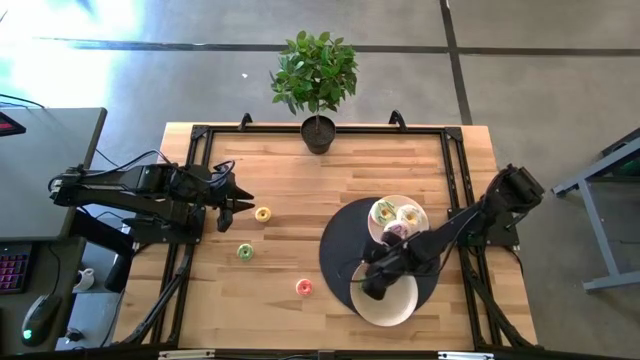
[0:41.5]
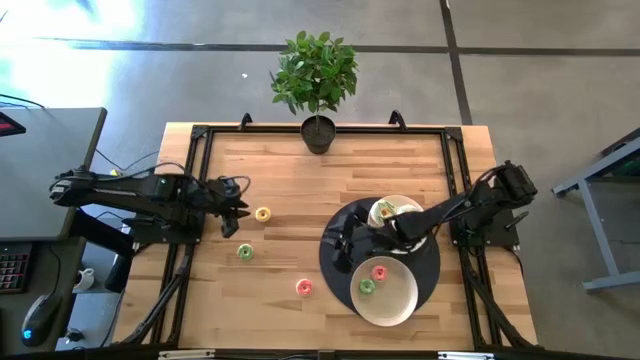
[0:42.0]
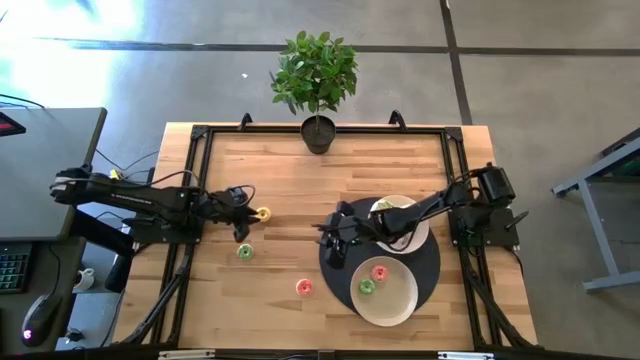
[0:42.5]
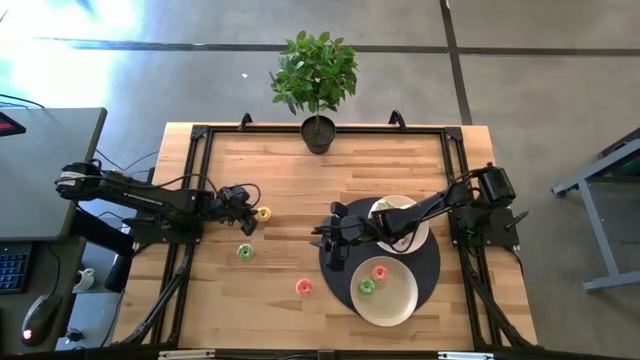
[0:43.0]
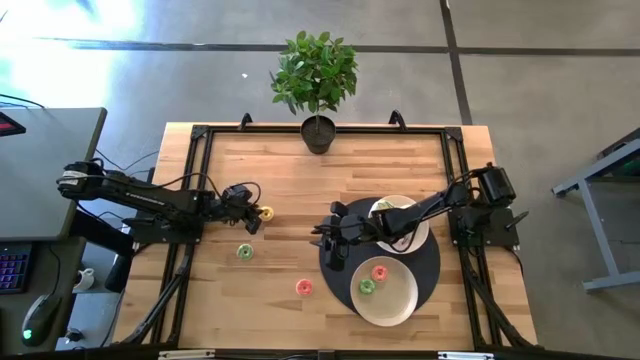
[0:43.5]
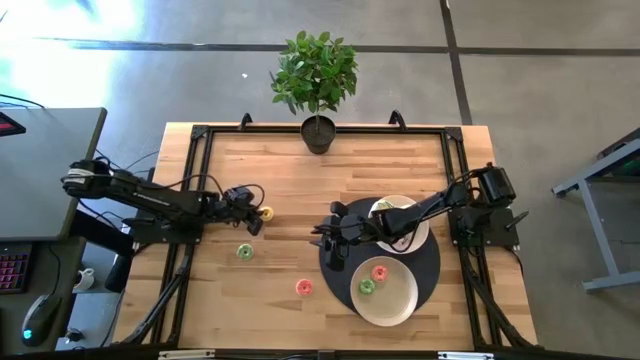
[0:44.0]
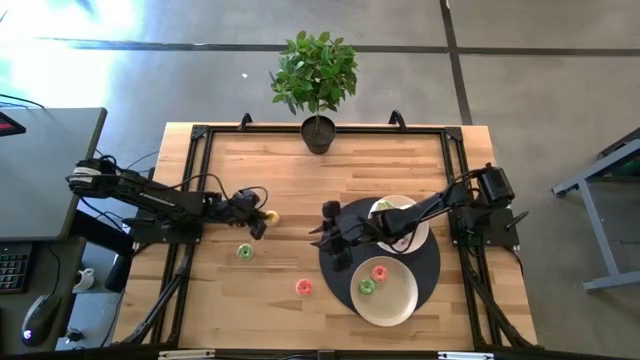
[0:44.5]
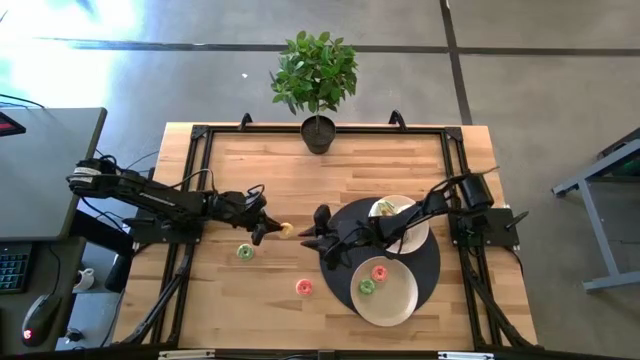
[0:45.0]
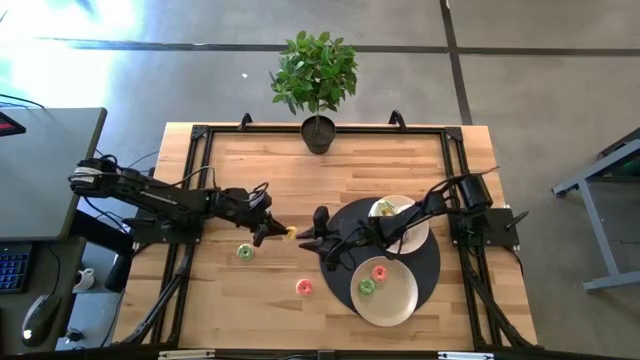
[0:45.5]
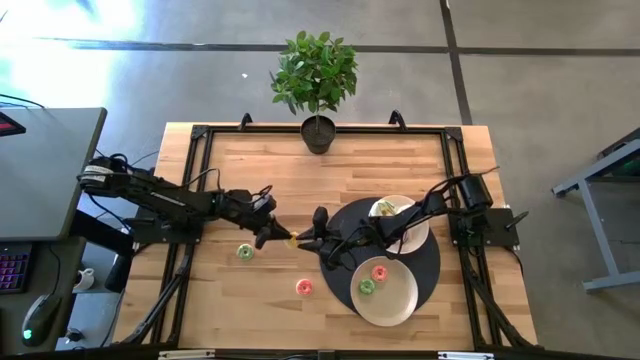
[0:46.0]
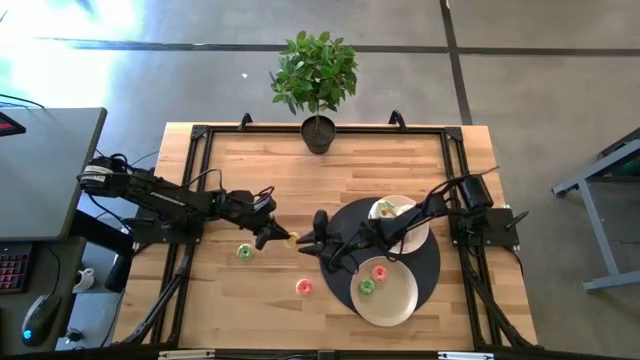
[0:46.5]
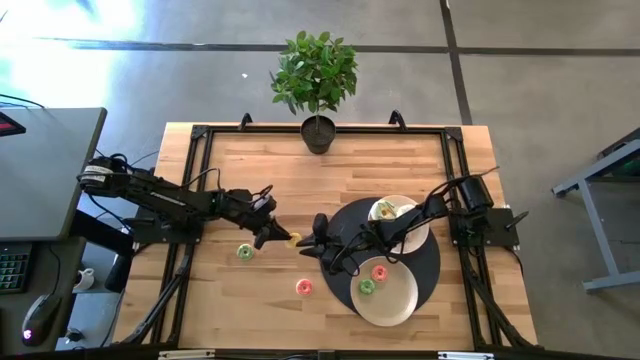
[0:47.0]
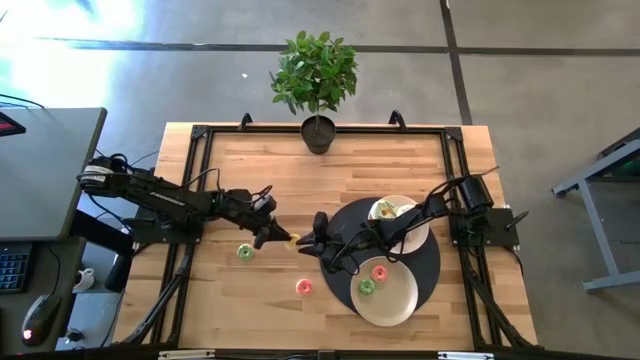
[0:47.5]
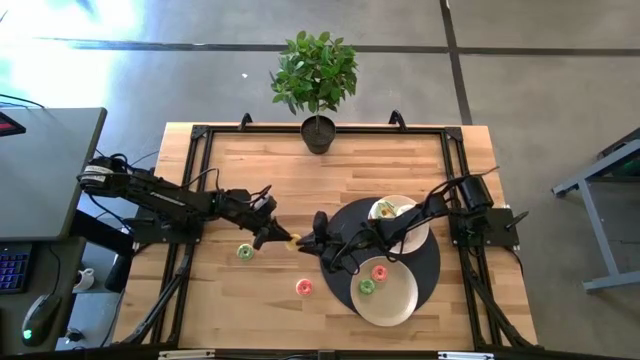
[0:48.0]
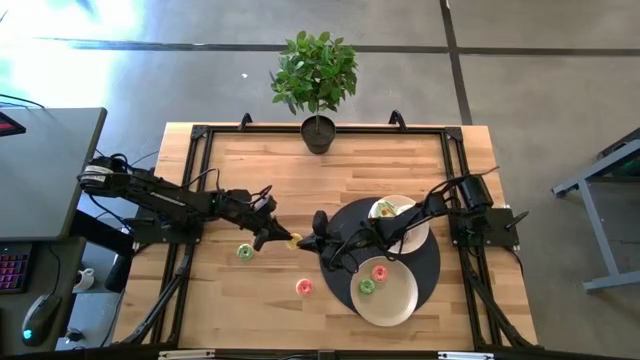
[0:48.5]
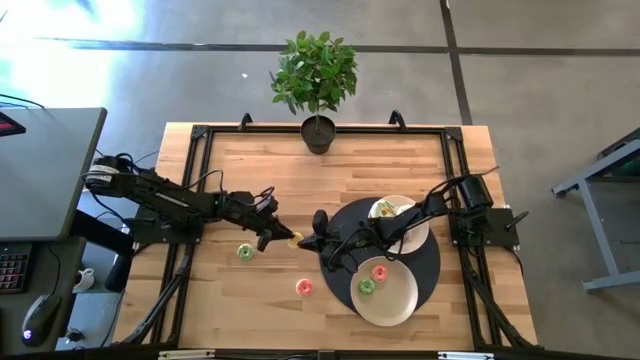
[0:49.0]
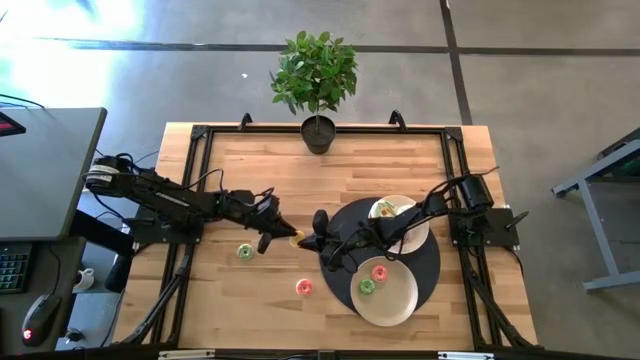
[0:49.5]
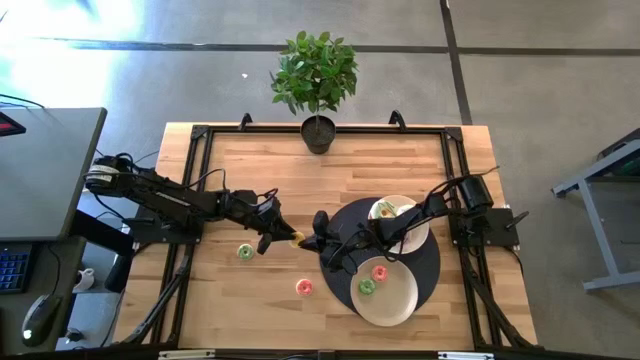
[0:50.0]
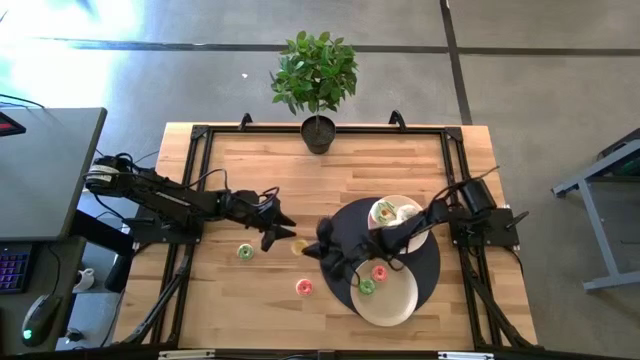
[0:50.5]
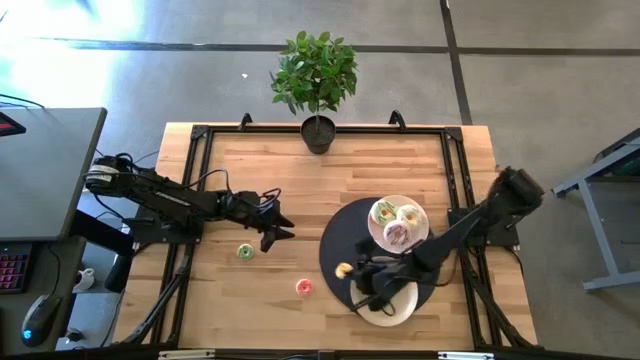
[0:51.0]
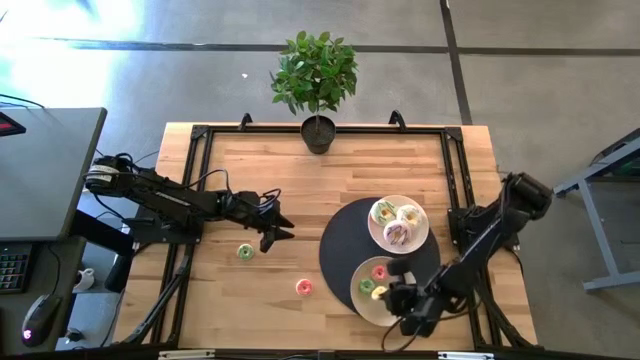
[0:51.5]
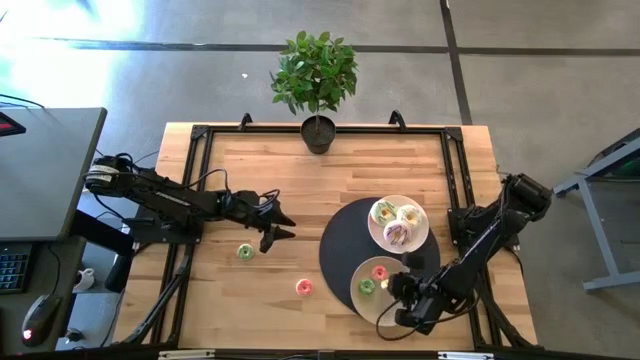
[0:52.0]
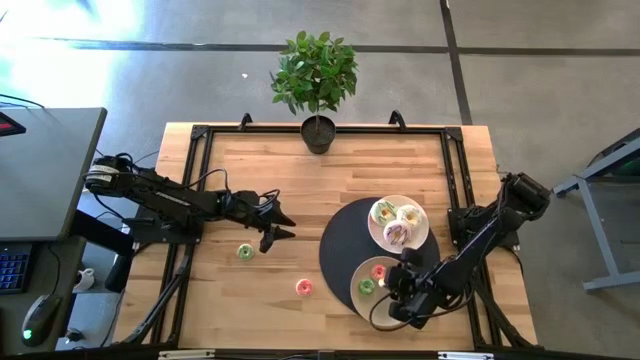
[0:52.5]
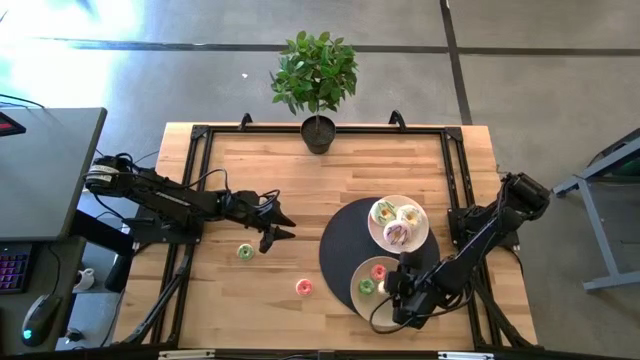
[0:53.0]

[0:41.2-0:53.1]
Task: Pick & Place donuts
Put the small yellow donut on the bottom white plate

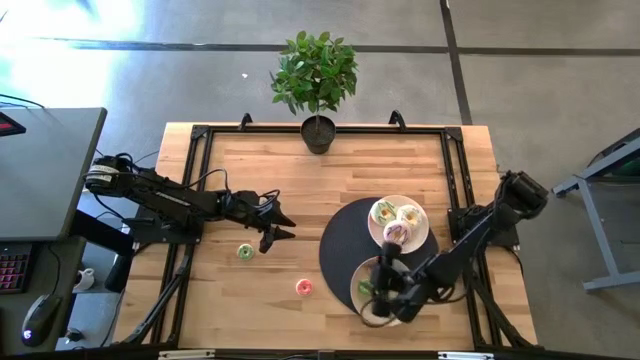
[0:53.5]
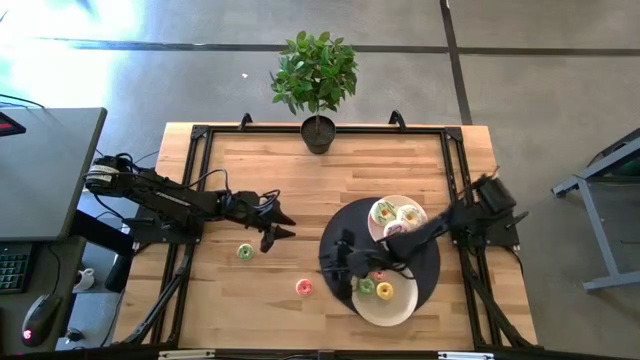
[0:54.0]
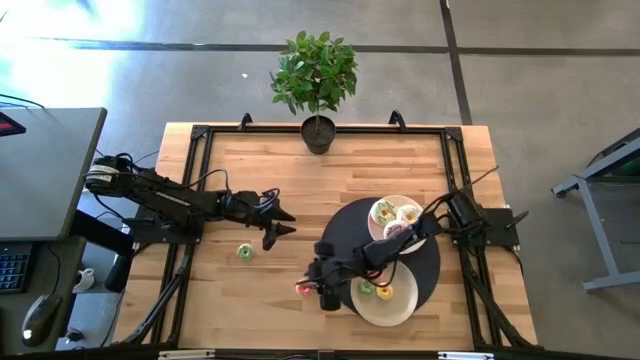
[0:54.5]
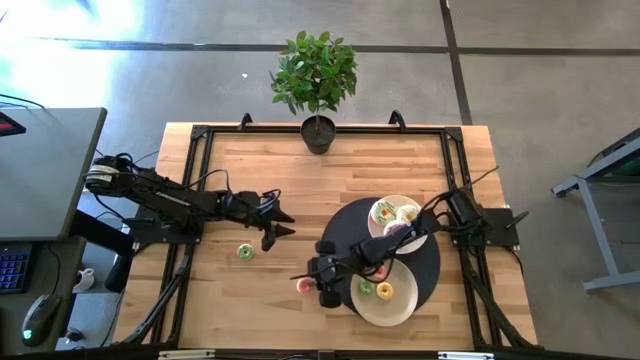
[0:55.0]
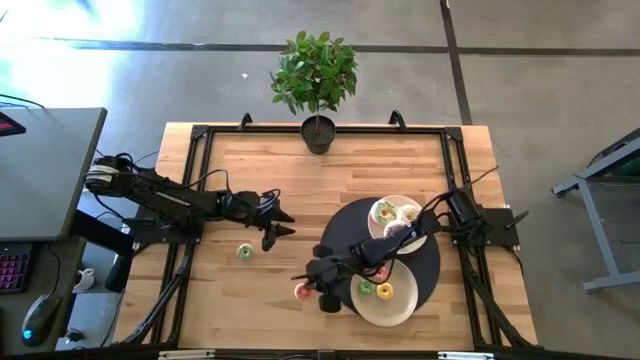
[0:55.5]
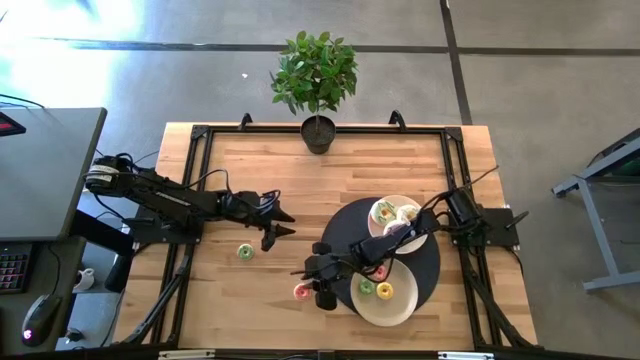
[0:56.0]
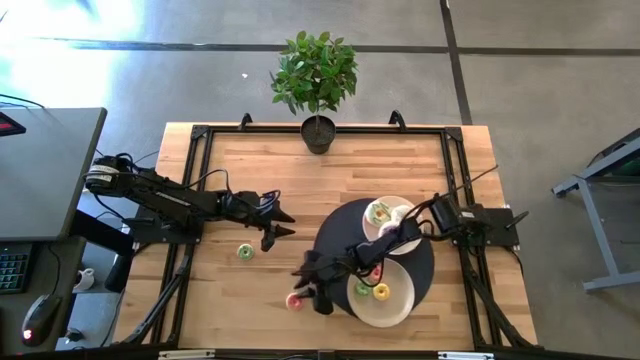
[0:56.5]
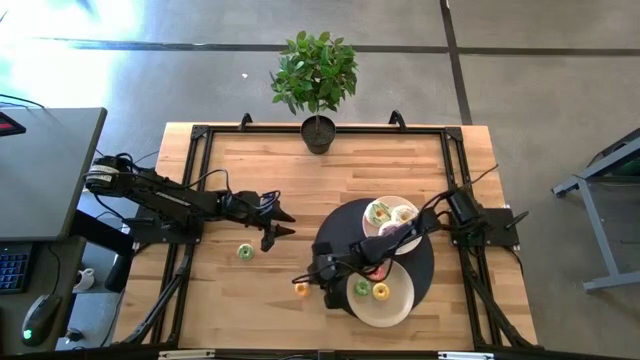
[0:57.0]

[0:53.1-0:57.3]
Put the small pink donut on the bottom white plate

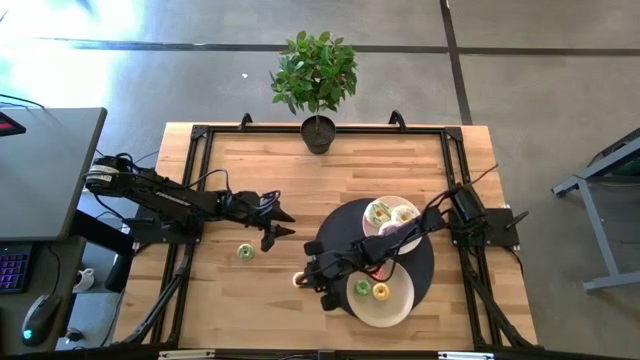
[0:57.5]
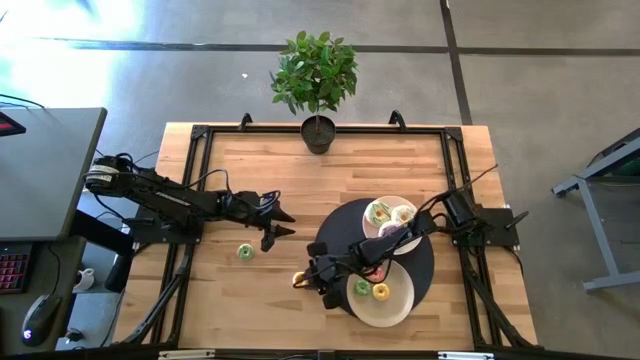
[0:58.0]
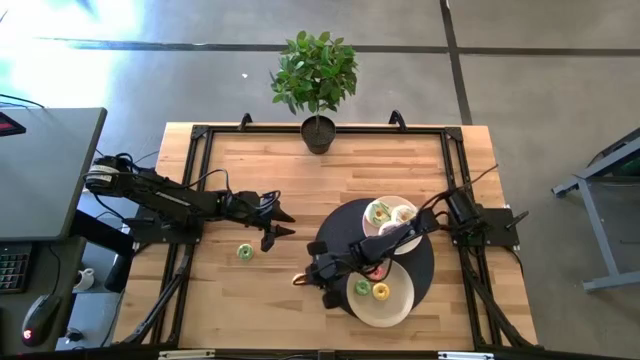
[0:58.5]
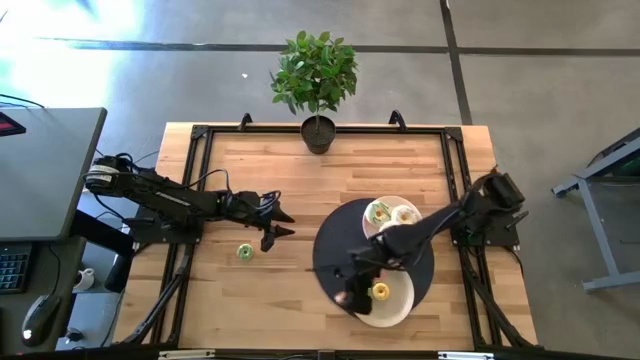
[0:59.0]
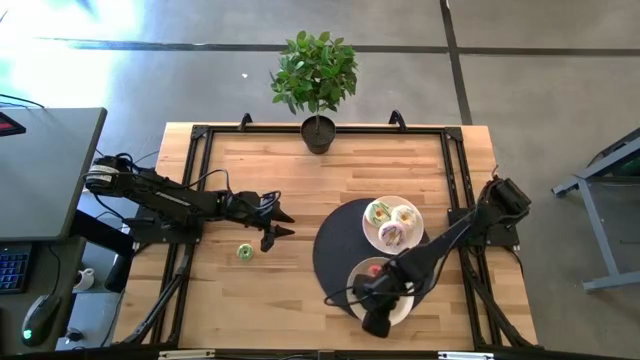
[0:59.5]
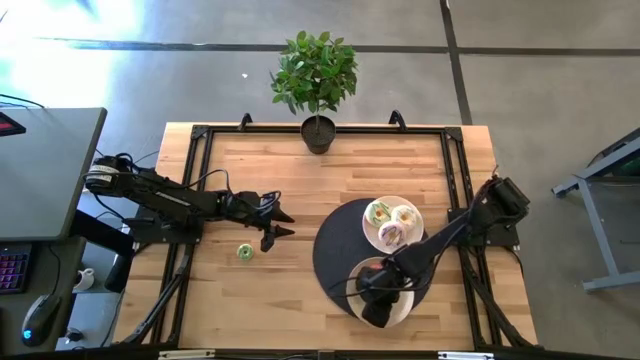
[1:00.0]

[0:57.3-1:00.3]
Put the small pink donut on the bottom white plate

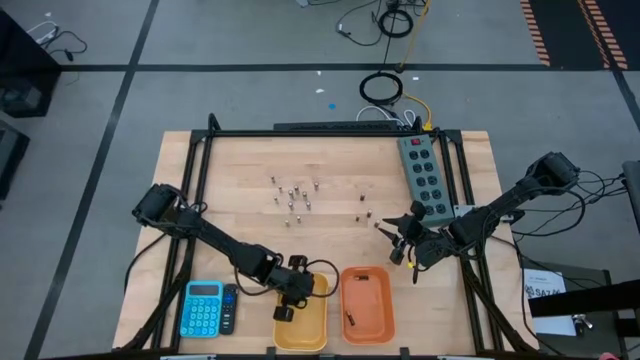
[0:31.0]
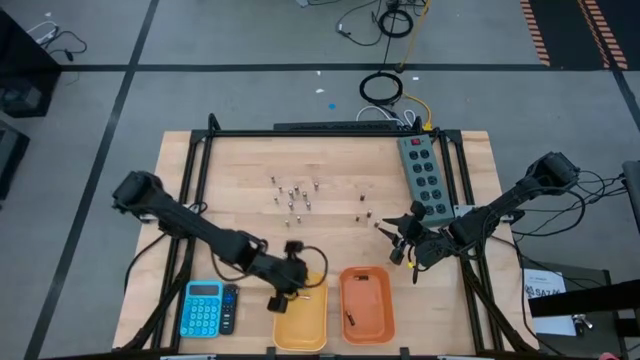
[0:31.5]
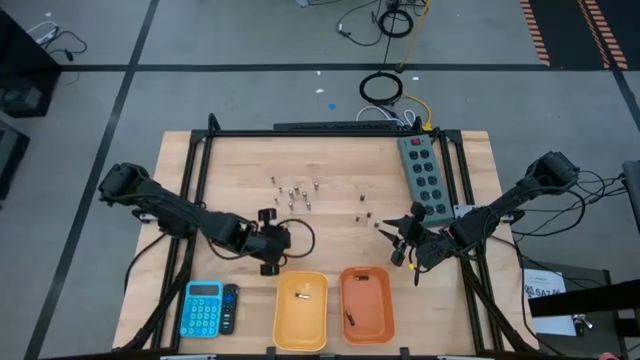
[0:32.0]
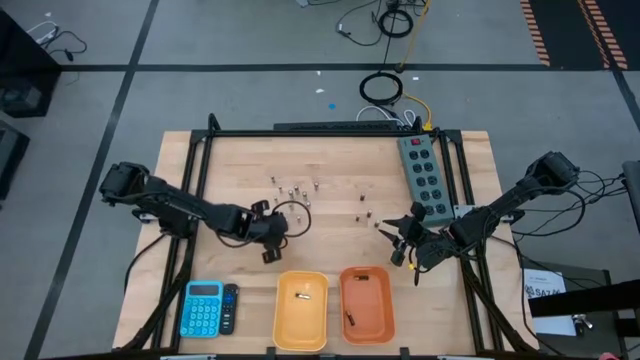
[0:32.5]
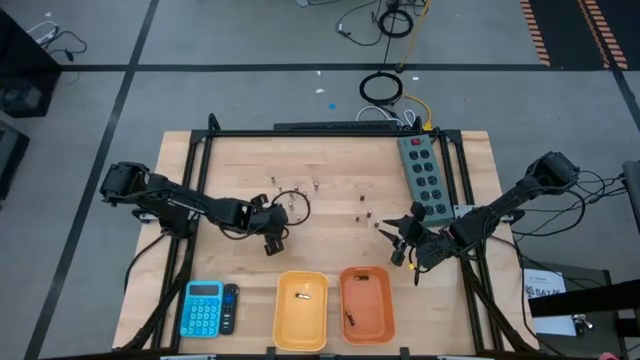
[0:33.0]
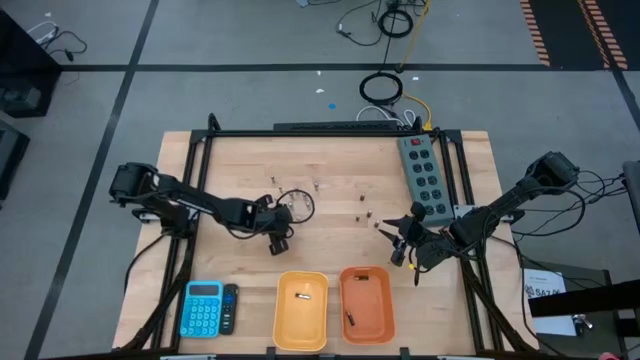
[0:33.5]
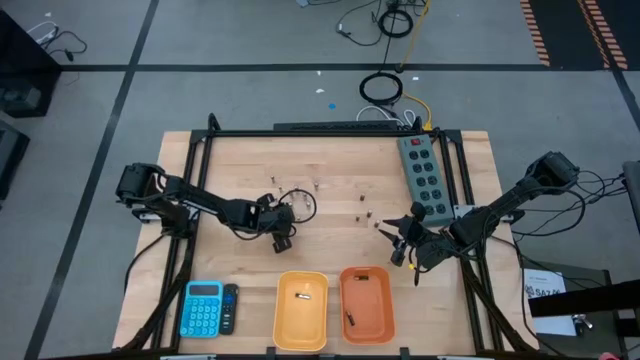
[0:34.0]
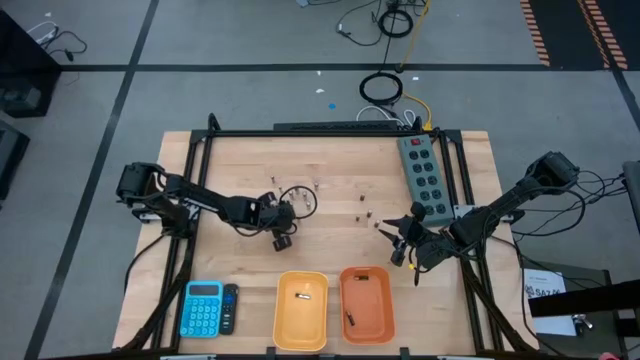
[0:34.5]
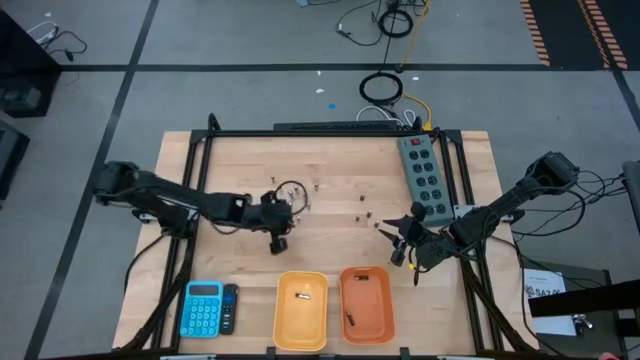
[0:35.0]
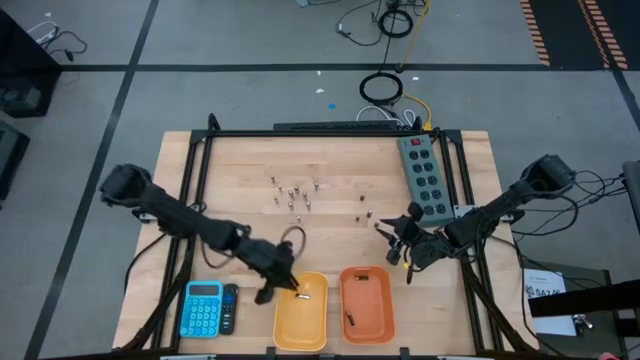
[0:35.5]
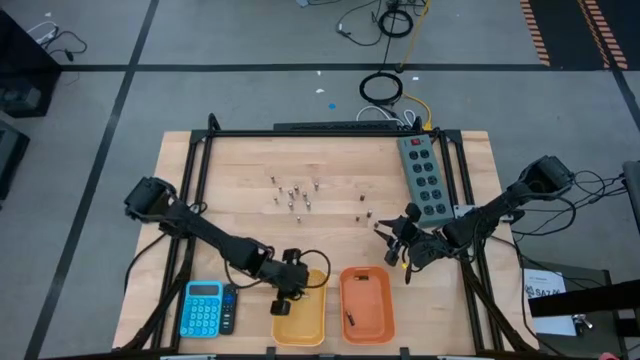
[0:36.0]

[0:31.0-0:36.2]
Task: Sort batteries
Put the silver battery into the yellow bin
